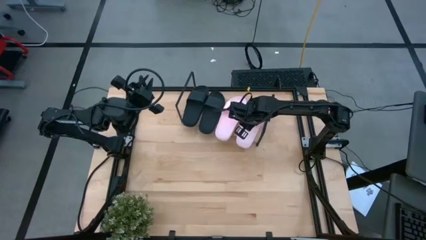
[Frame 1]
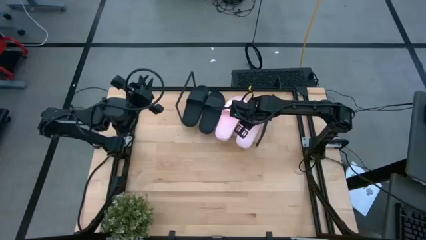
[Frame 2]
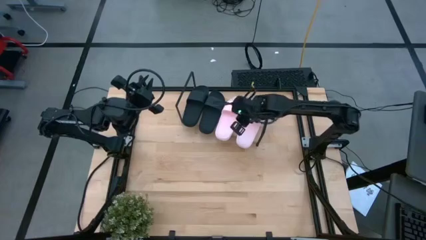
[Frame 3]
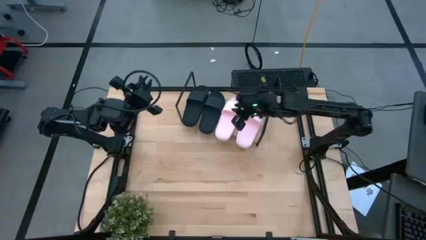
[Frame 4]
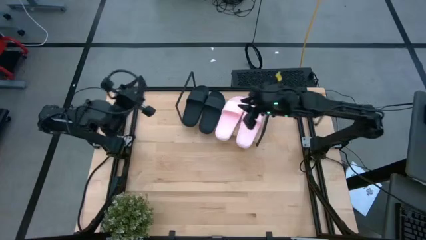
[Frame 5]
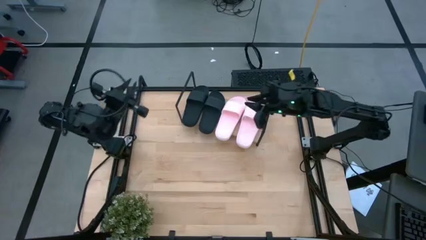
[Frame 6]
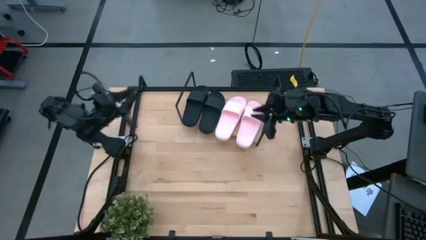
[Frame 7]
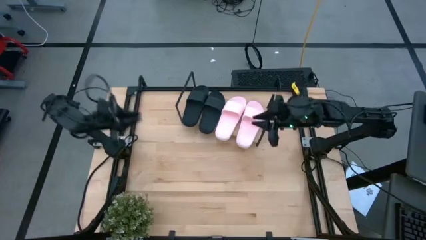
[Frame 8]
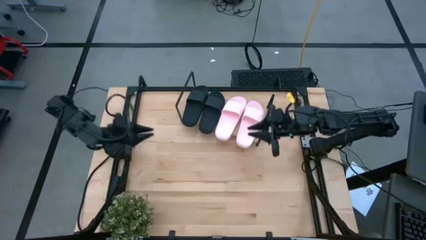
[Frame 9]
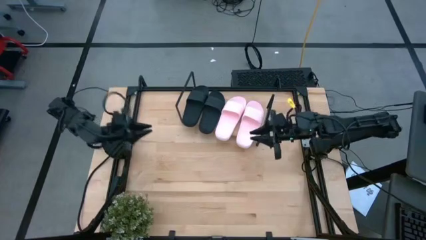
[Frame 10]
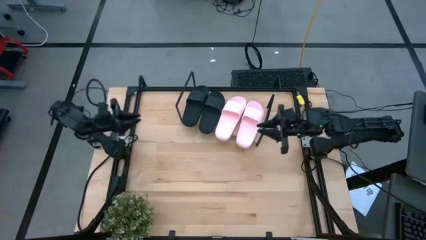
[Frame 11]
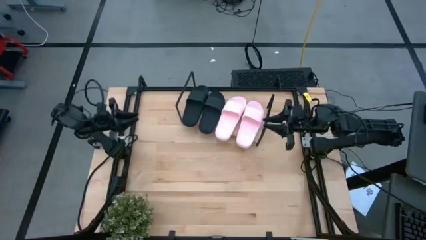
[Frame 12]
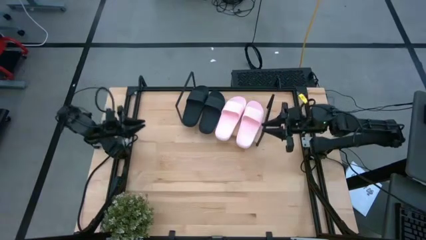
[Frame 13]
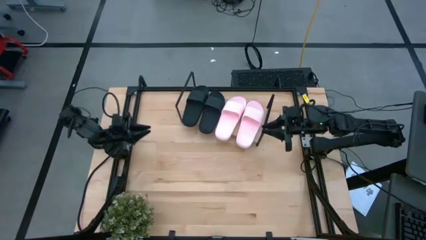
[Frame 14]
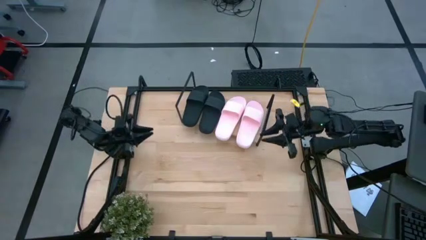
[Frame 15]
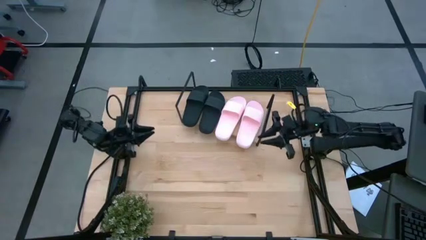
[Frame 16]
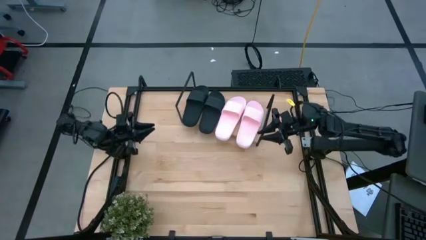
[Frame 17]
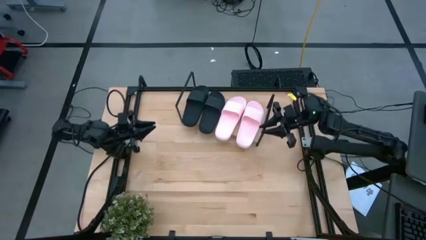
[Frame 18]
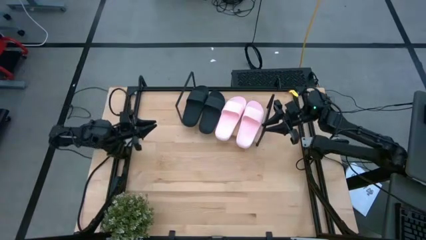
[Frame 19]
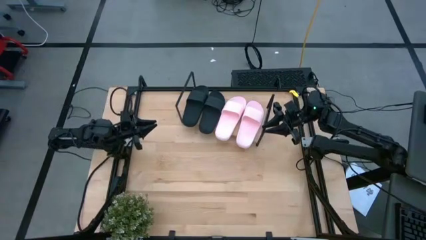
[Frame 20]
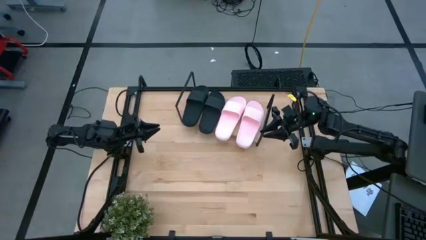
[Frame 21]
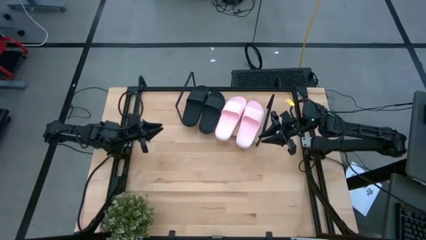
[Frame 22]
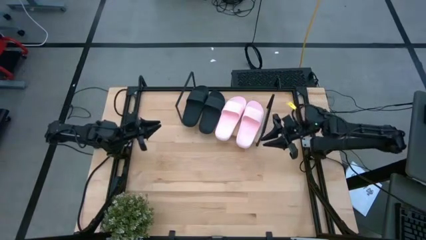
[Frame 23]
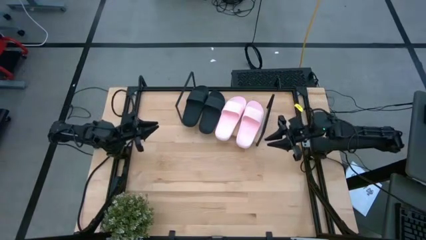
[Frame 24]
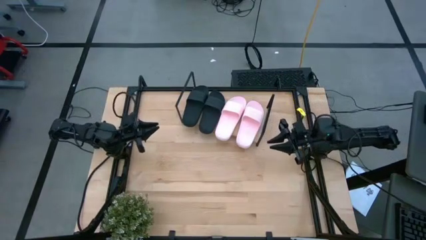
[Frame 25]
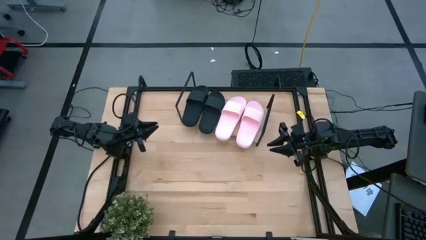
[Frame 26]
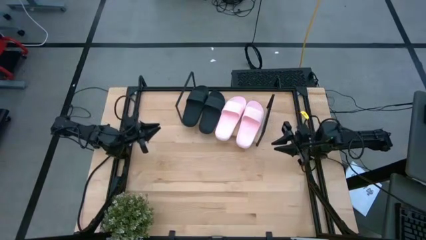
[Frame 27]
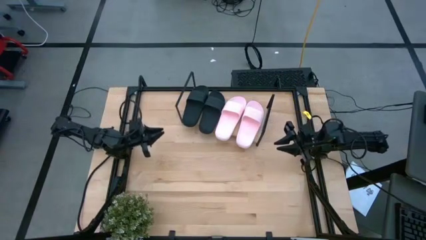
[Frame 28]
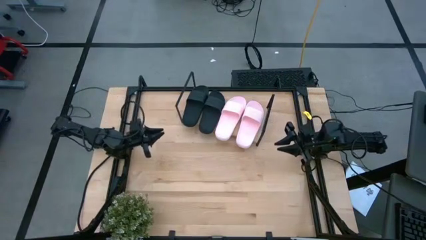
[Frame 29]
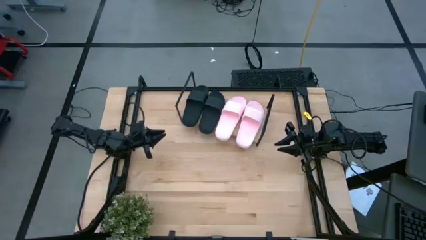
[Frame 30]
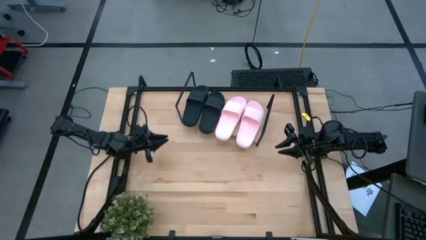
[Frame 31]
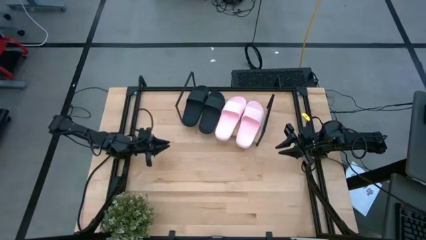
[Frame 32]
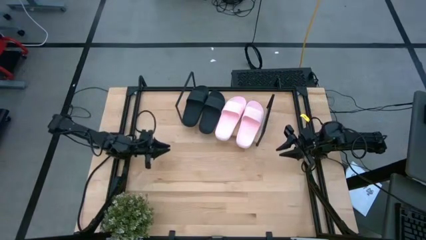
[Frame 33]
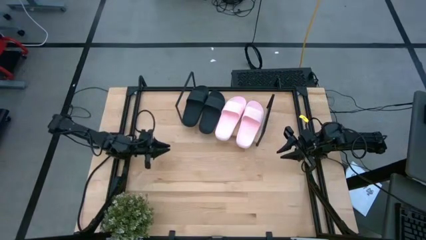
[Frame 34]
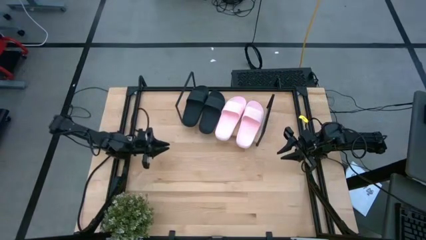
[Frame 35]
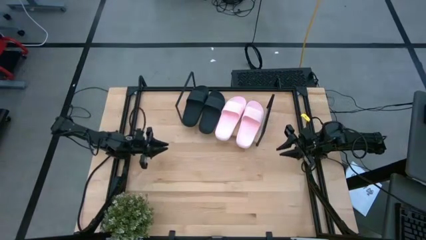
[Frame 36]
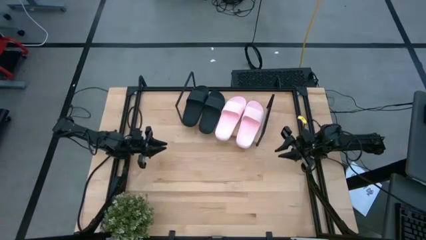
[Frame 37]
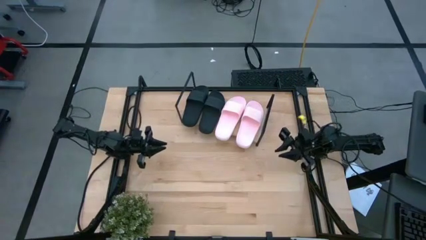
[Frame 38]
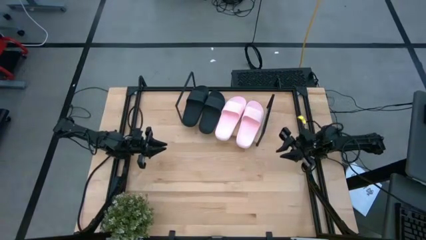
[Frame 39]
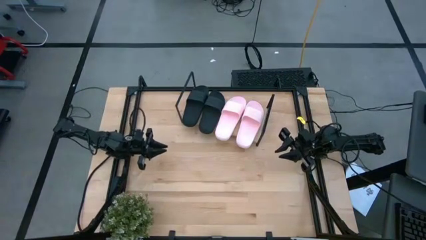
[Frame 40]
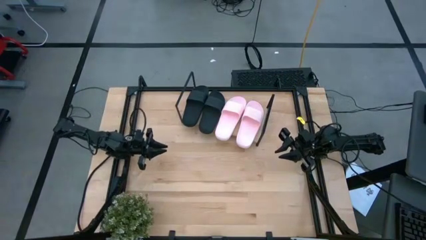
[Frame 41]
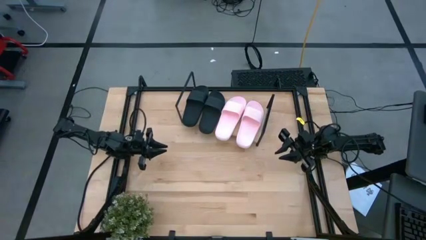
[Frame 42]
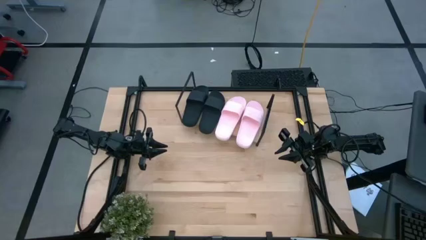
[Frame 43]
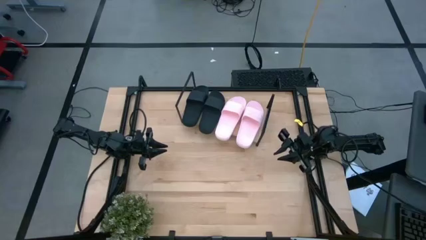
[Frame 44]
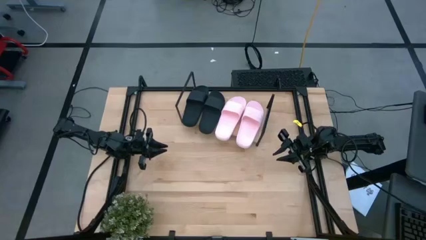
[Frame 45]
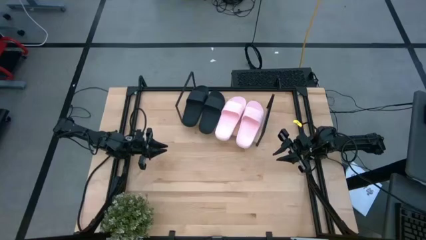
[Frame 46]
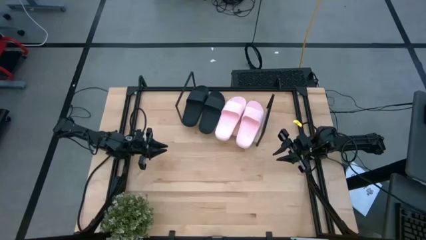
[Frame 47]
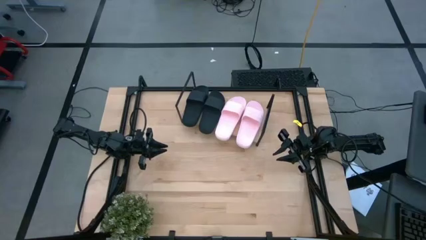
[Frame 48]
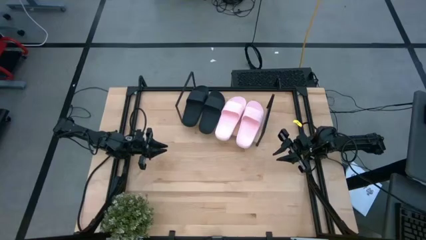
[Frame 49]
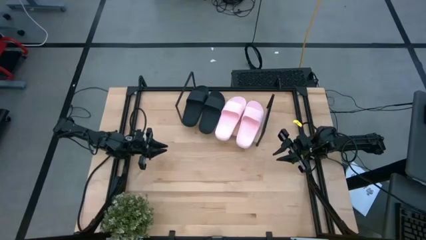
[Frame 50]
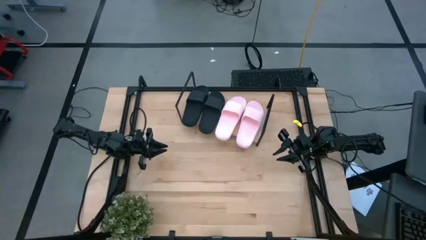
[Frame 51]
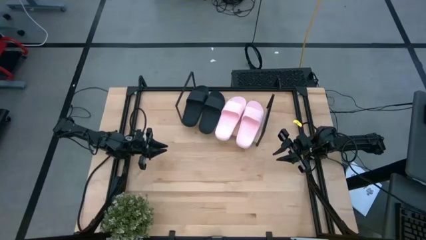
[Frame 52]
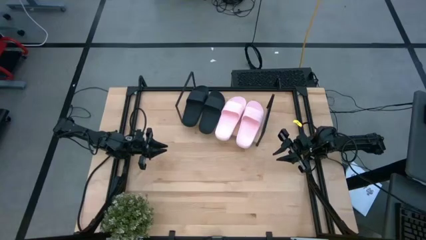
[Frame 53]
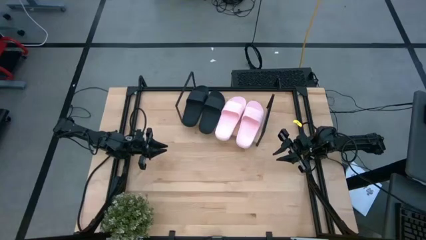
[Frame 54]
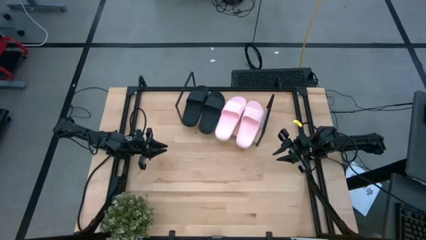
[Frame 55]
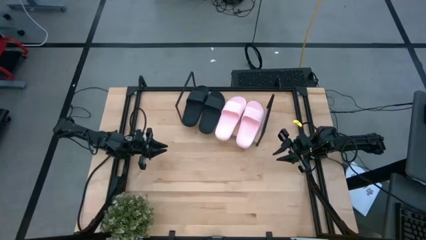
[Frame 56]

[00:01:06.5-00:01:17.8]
Task: Pick and place slides into the shelf
Return to Home Position

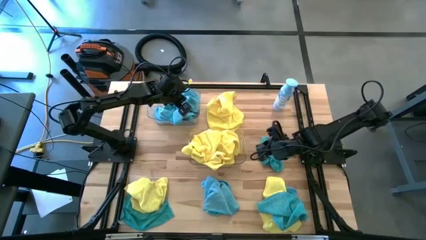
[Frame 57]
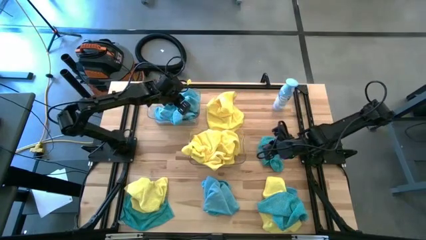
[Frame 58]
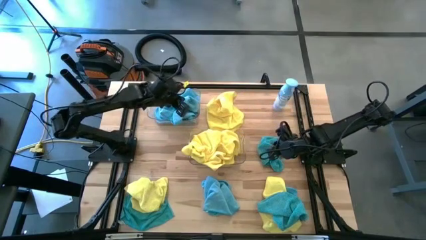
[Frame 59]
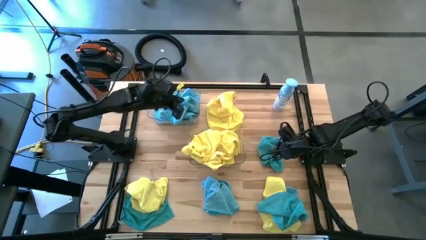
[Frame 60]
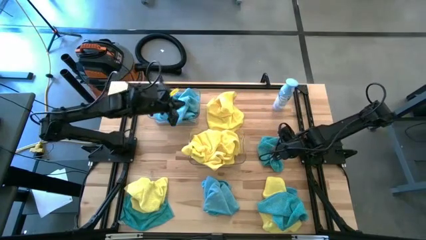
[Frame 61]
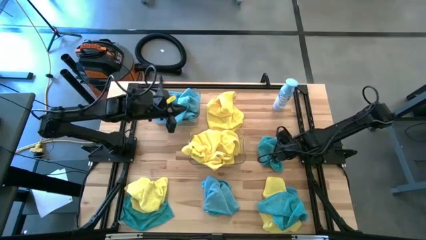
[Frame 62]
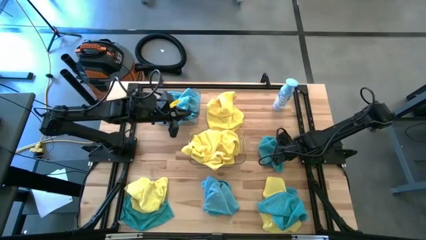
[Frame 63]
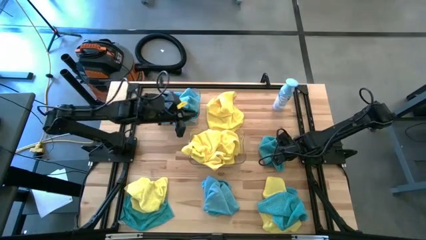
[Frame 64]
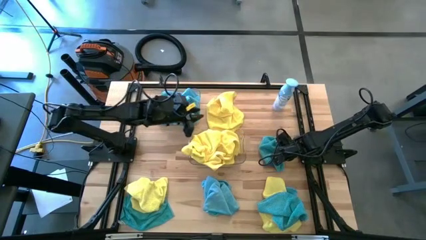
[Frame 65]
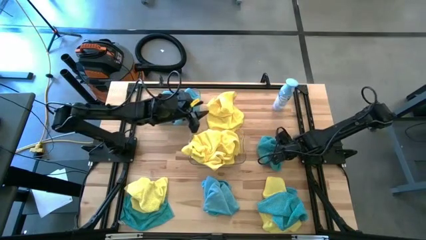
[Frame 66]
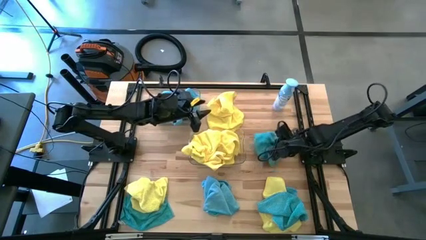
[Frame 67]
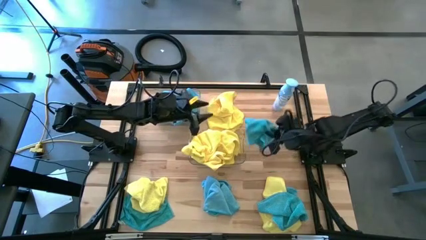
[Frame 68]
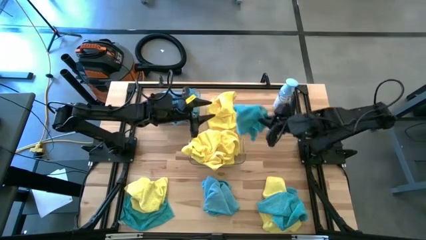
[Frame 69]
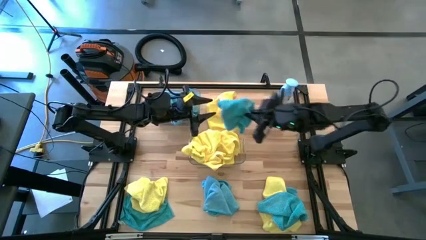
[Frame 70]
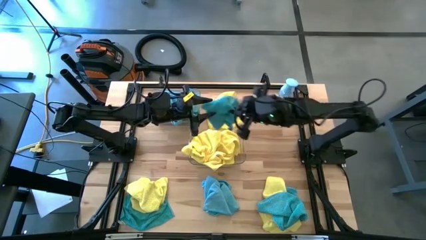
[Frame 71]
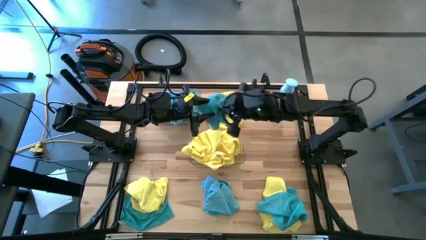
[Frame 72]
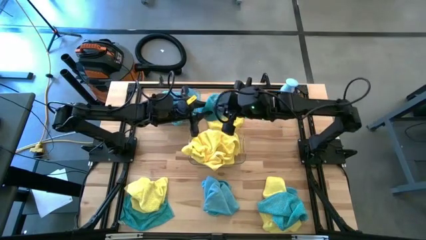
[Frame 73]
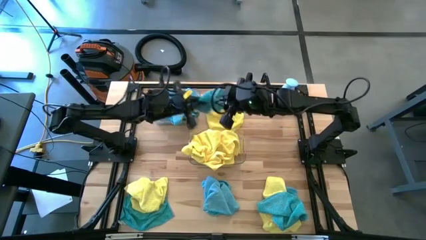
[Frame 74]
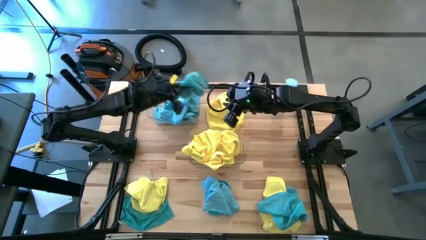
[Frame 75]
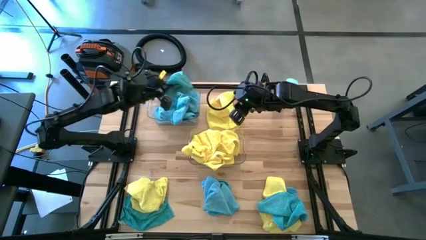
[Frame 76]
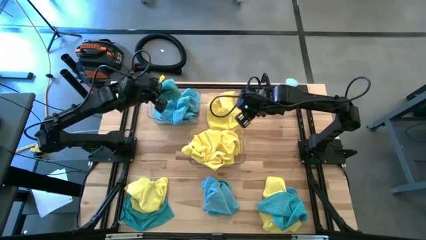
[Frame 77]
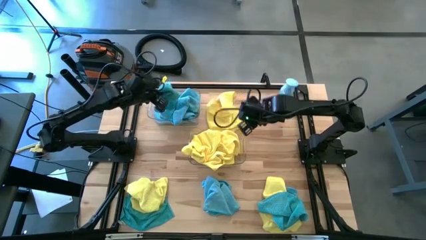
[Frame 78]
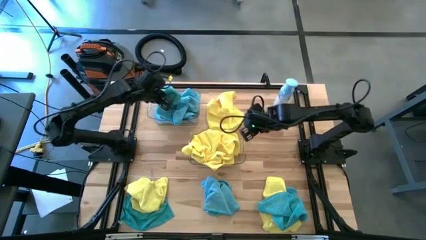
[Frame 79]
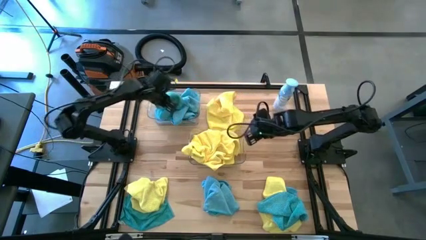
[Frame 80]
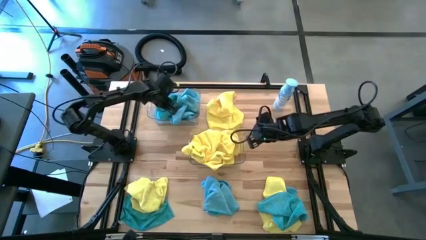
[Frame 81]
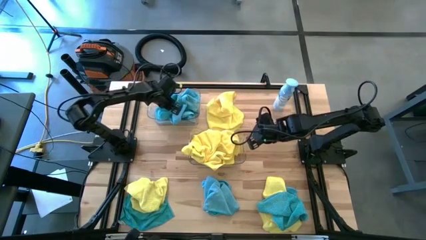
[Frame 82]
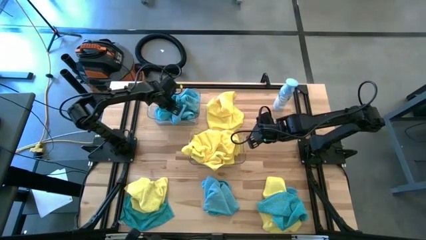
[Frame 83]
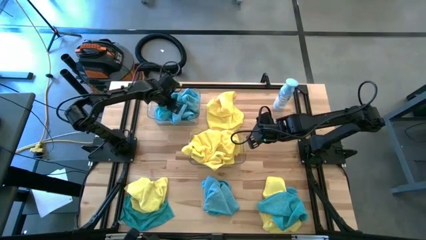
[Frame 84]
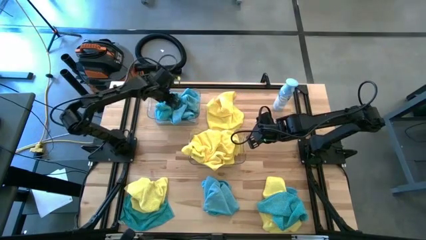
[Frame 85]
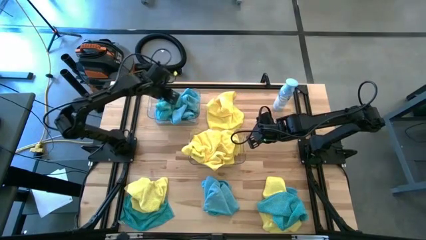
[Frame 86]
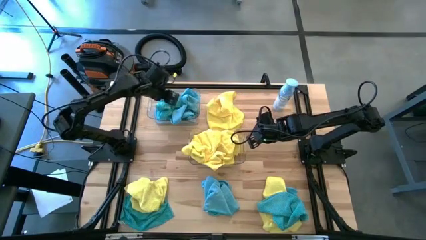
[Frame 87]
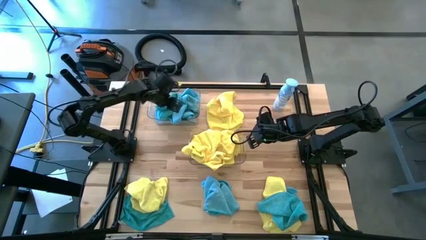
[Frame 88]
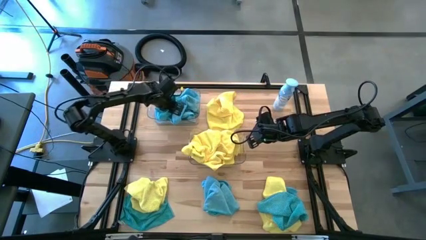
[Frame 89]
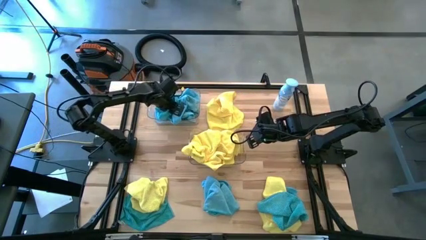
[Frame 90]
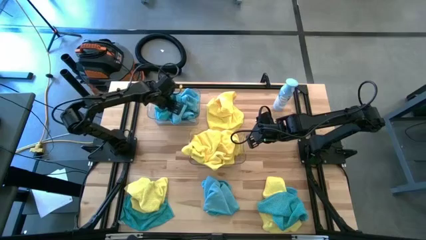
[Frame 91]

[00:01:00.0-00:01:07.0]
Task: Sort microfiber towel by color & place in baskets
Put the blue towel into the top transparent bin
